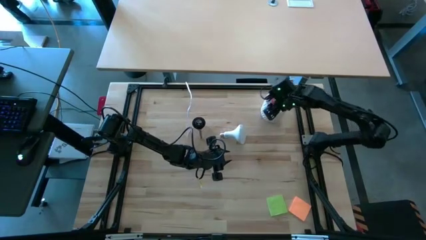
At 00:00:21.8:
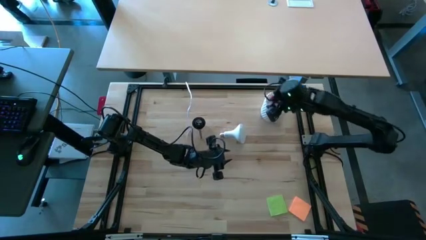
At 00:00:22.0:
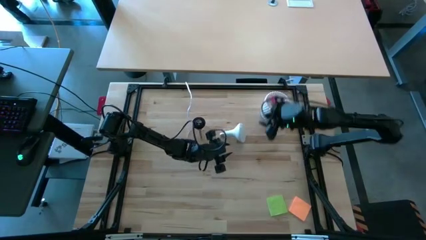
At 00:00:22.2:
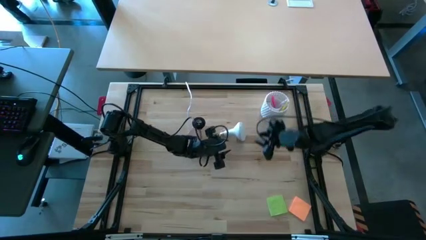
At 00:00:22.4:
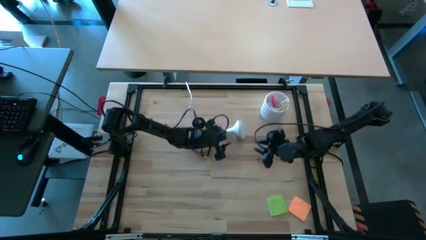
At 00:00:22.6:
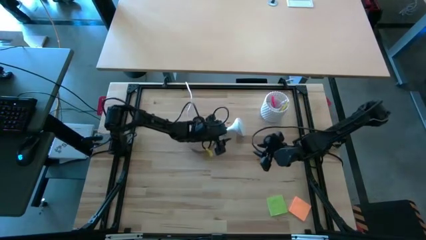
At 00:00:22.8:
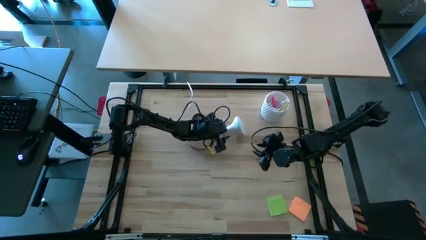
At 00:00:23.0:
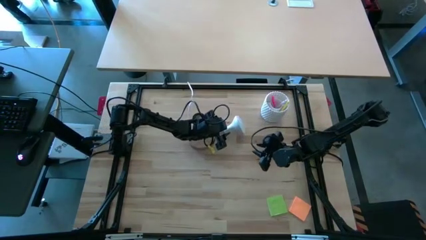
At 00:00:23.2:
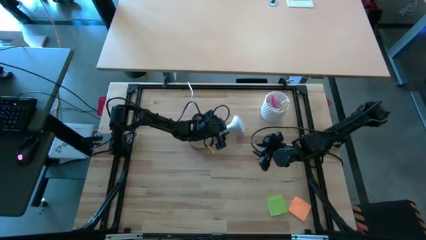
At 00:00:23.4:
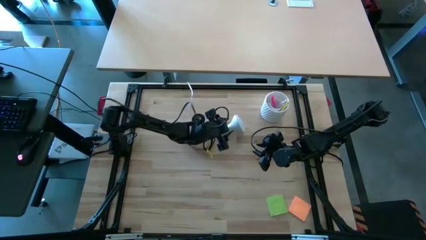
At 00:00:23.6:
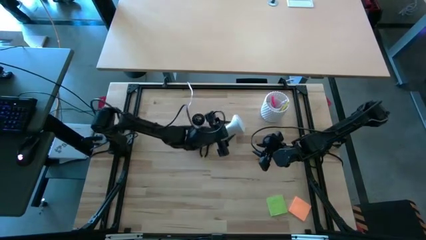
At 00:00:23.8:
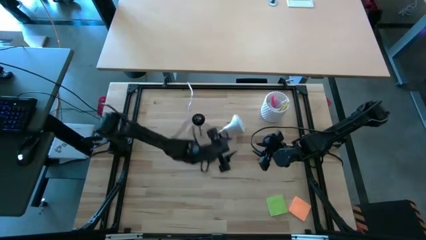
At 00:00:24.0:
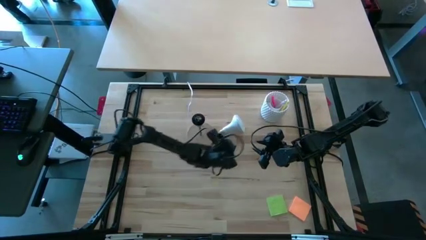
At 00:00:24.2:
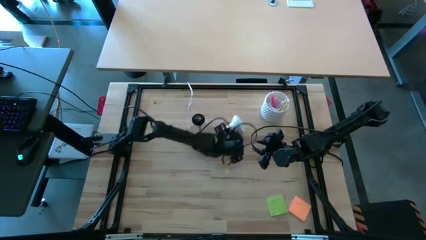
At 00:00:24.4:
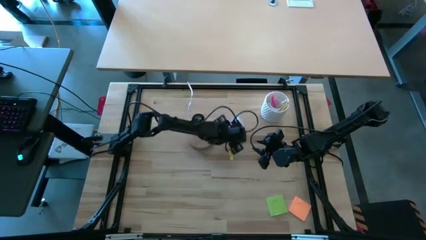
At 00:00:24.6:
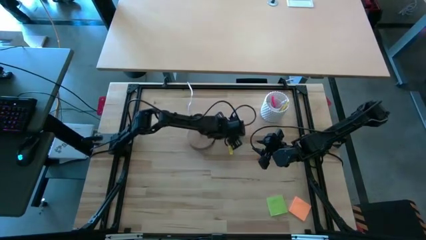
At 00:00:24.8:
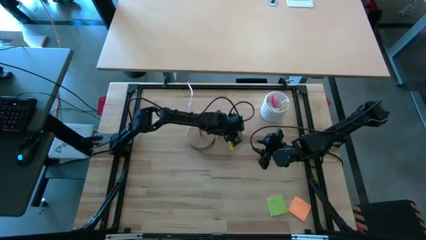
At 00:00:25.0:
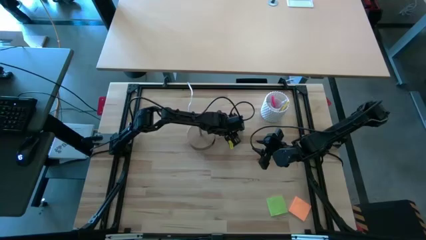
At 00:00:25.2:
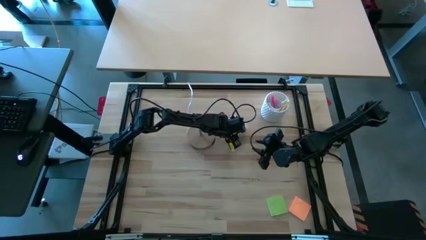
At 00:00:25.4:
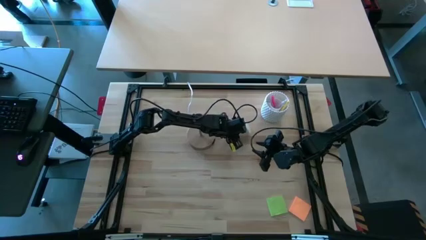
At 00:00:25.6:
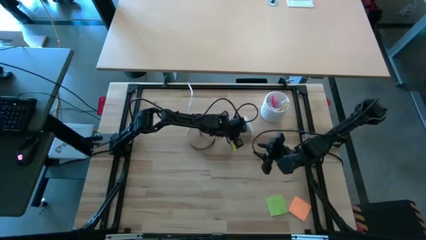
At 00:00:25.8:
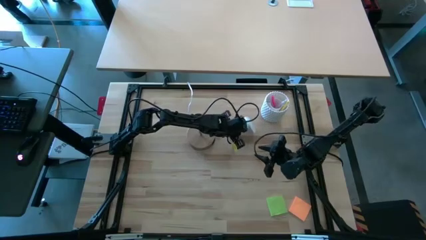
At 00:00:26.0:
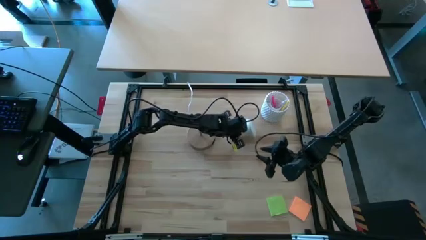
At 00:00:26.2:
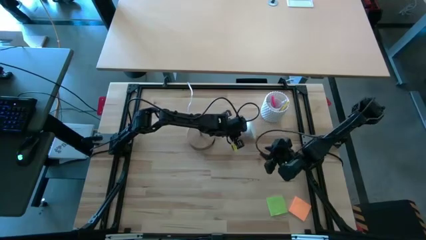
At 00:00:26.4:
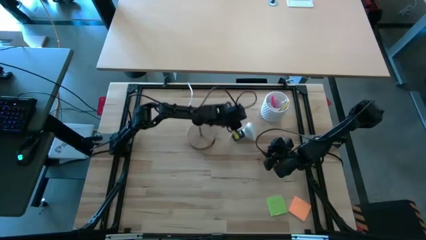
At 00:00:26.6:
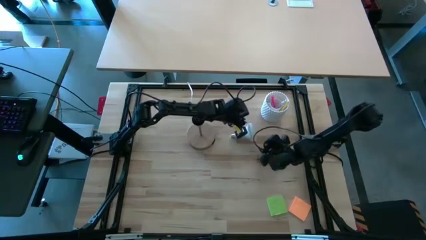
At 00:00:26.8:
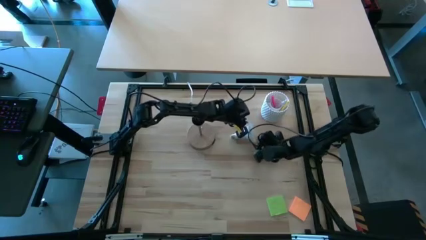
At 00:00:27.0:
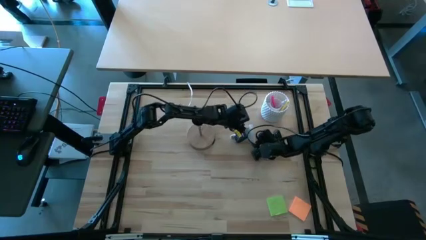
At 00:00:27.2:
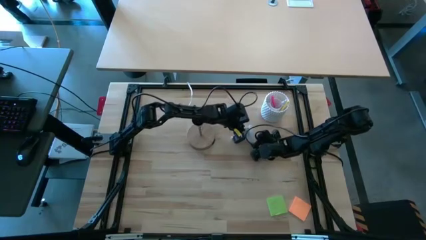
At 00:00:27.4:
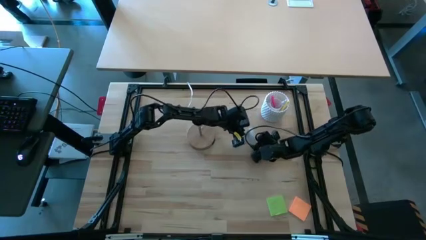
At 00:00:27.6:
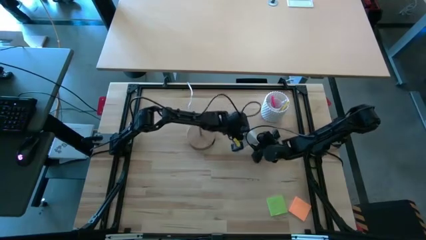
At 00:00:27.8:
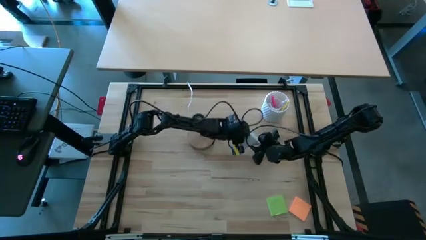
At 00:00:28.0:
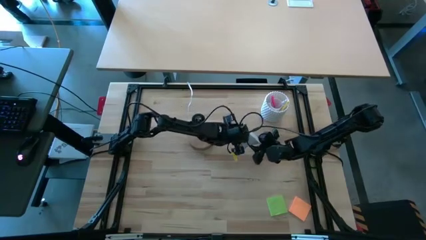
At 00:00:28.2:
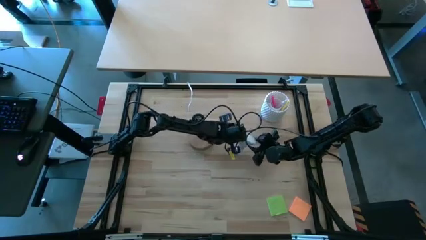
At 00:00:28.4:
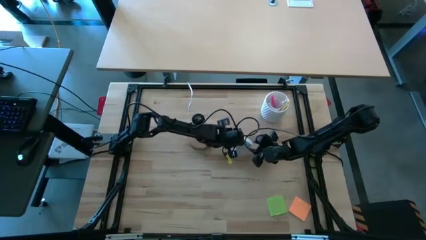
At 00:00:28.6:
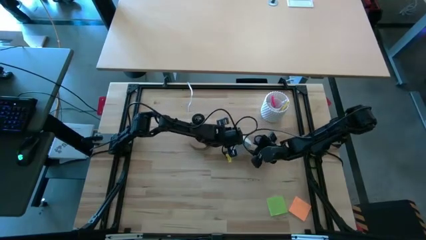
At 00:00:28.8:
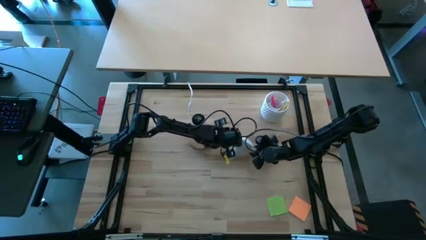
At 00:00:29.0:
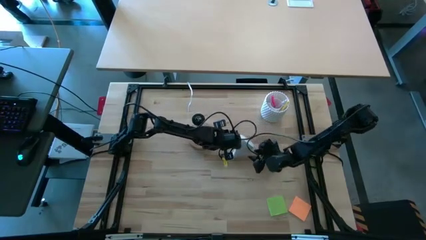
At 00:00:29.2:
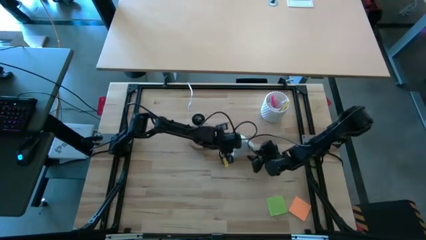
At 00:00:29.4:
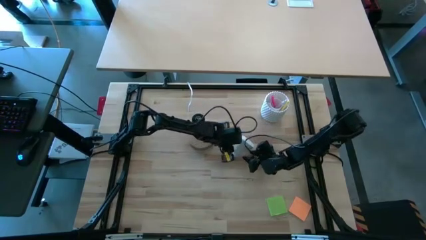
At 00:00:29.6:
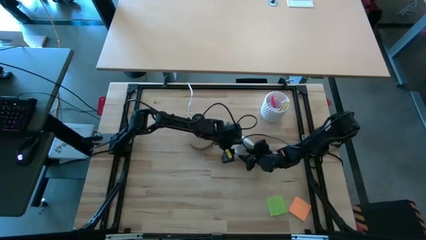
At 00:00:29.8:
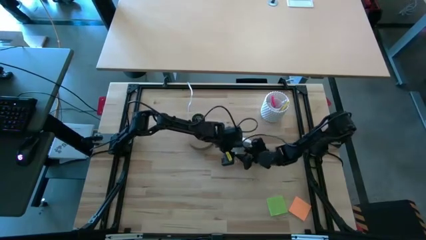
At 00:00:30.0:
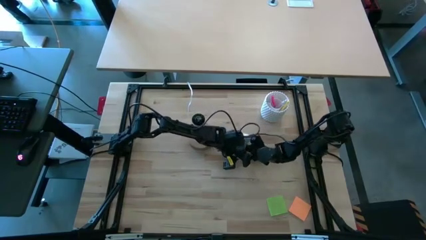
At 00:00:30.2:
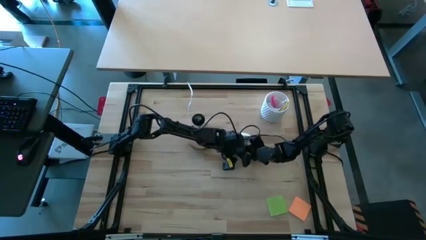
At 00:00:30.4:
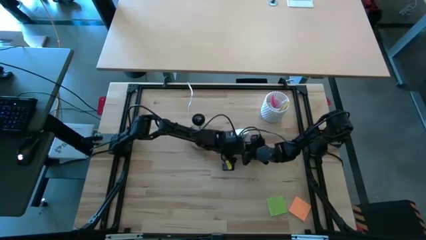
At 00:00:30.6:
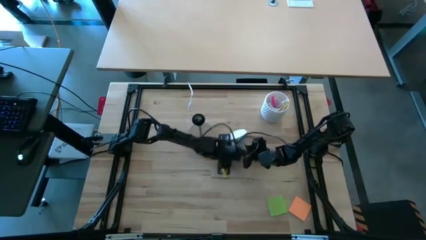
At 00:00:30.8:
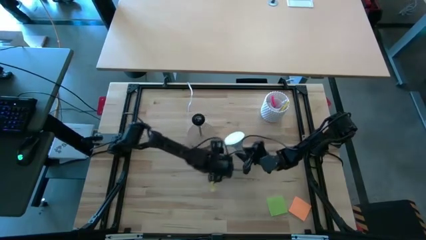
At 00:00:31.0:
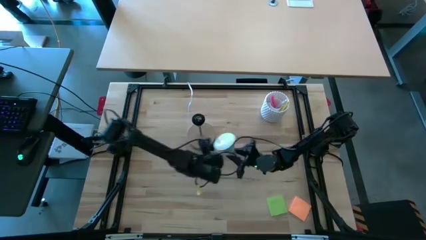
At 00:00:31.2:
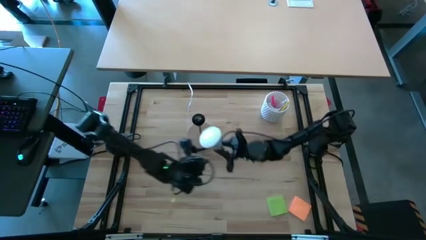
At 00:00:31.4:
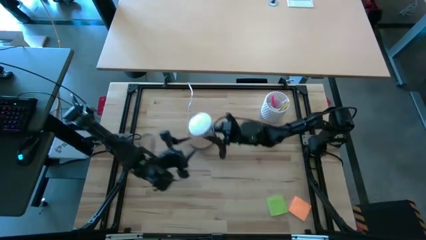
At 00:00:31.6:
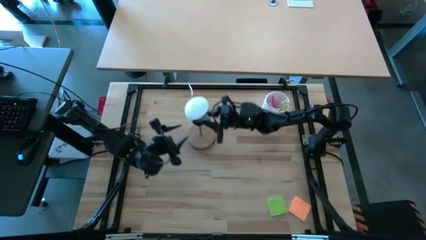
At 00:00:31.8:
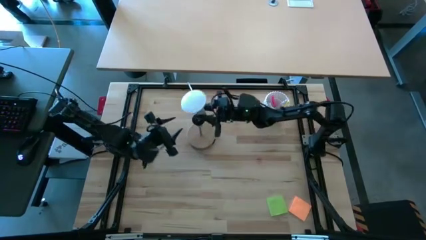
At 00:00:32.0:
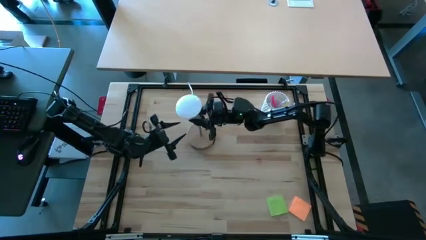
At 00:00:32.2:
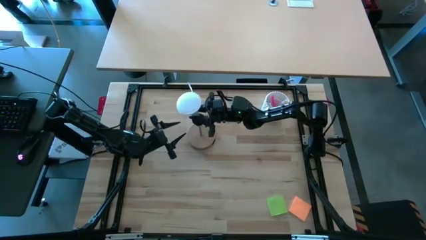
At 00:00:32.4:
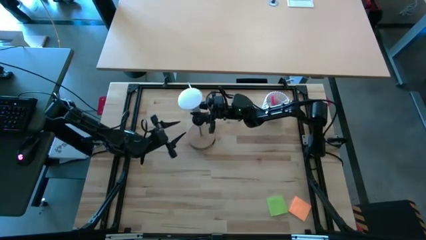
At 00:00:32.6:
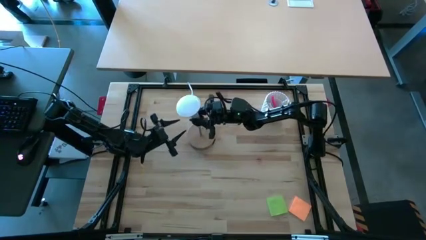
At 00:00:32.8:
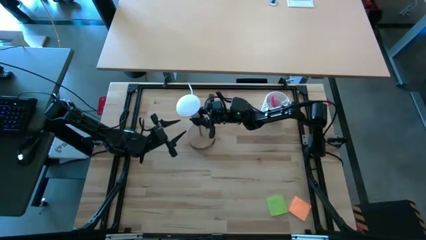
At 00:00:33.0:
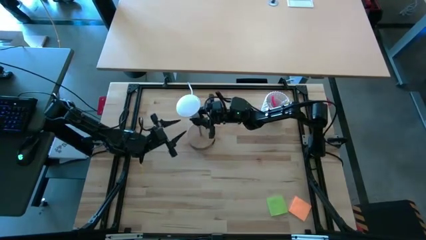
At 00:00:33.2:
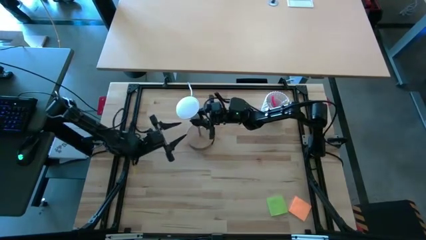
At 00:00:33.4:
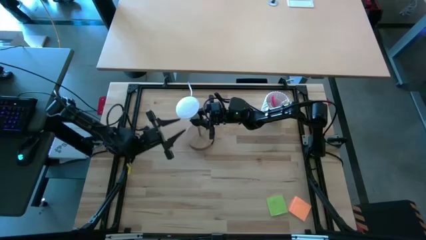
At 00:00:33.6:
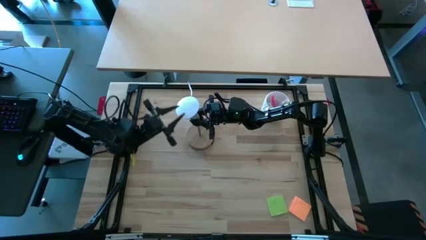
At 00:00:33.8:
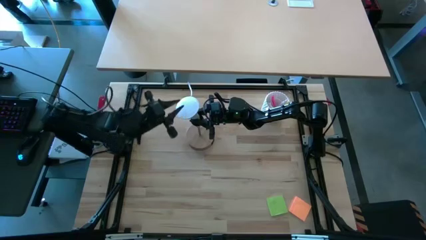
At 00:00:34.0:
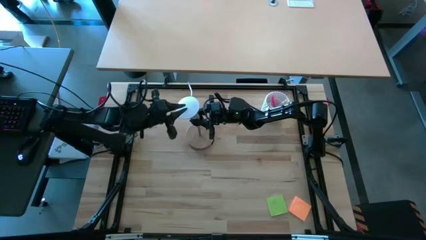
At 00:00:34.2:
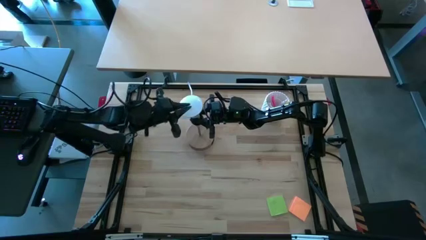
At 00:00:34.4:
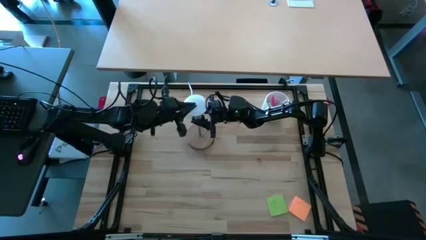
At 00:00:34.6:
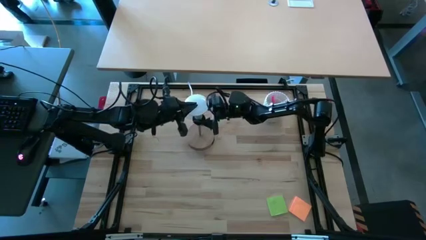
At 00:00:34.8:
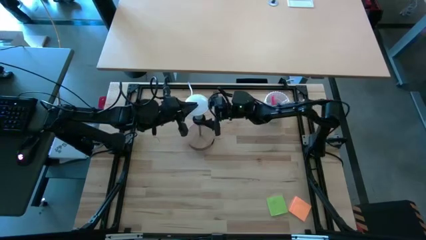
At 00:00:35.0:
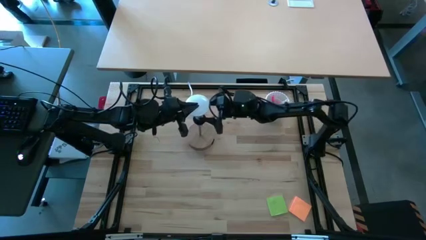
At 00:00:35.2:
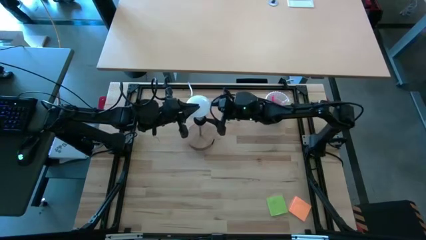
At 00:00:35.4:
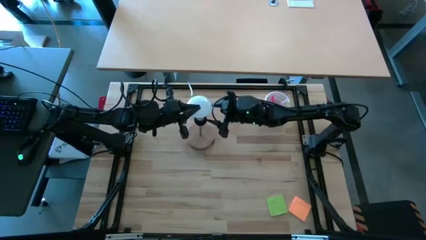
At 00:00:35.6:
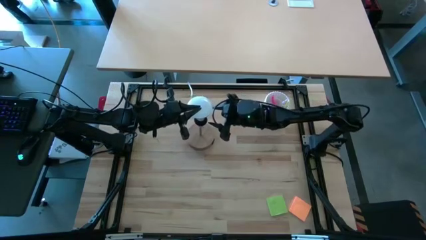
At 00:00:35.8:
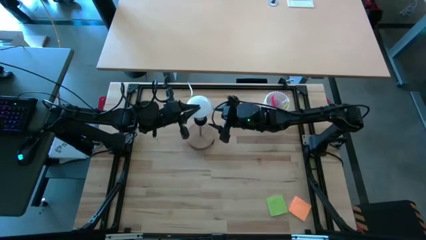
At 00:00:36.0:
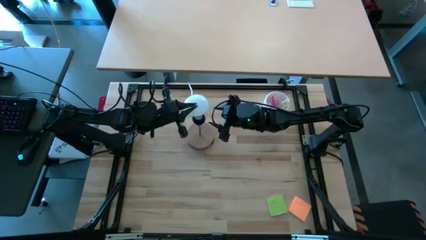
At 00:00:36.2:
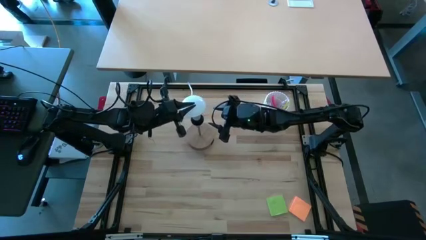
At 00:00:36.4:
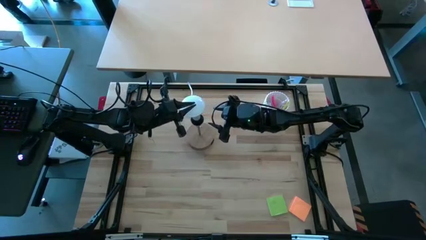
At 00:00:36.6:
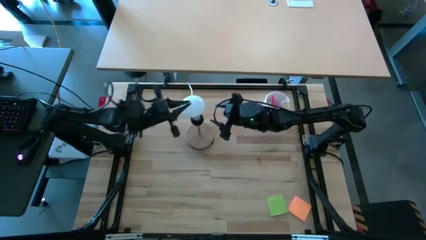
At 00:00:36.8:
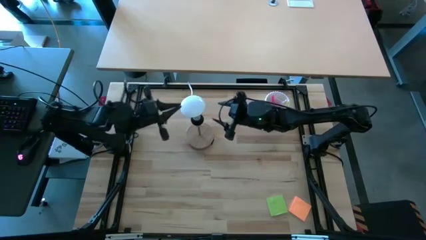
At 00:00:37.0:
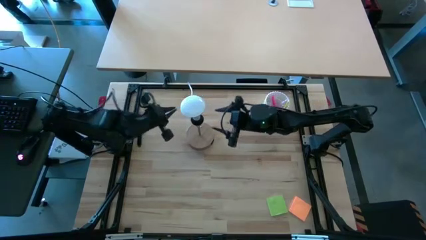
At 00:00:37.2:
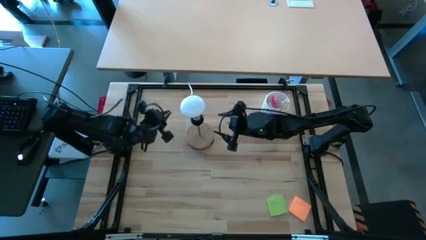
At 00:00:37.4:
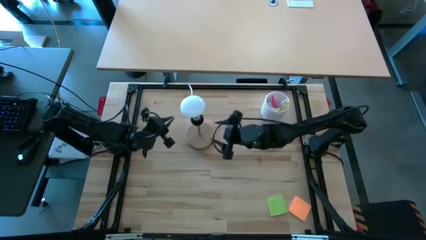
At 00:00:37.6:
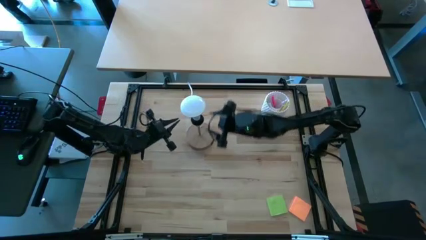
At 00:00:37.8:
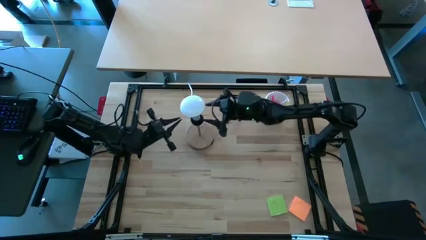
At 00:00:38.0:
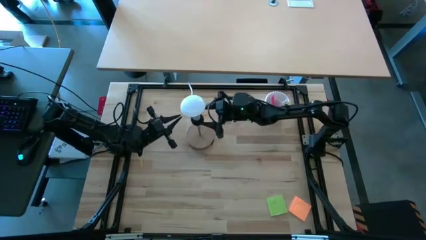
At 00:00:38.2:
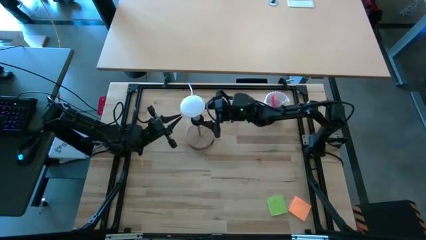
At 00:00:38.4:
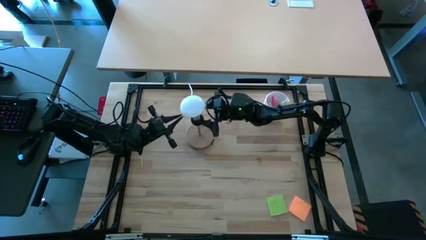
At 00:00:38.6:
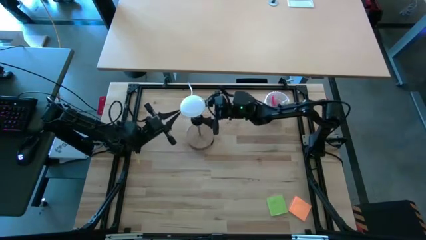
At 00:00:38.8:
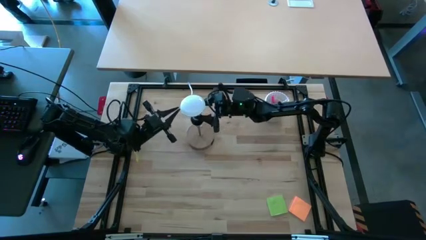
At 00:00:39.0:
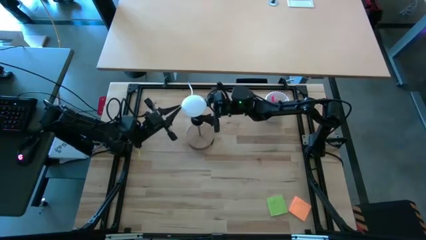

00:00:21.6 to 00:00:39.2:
Task: Screw lightbulb
Insert the lightbulb into the lamp
